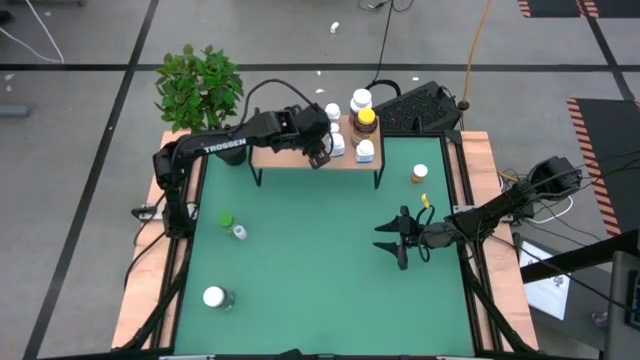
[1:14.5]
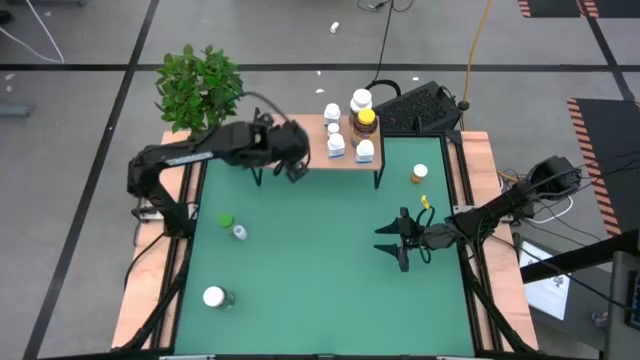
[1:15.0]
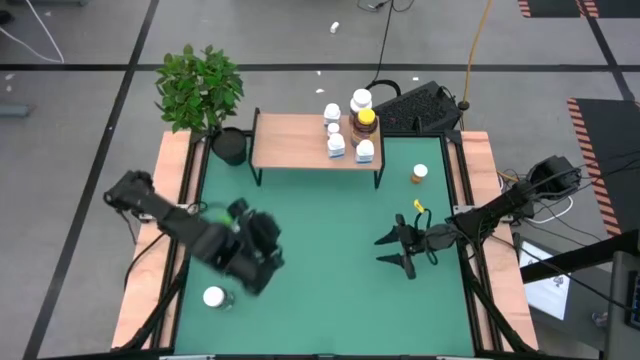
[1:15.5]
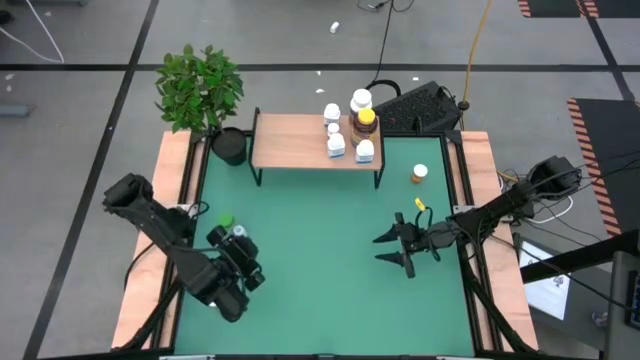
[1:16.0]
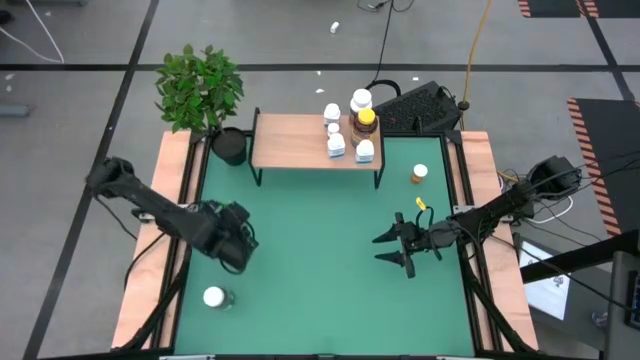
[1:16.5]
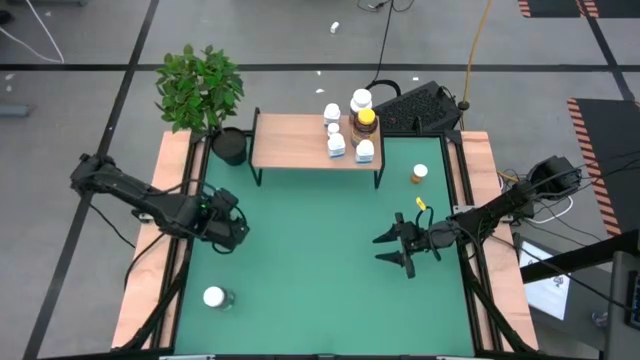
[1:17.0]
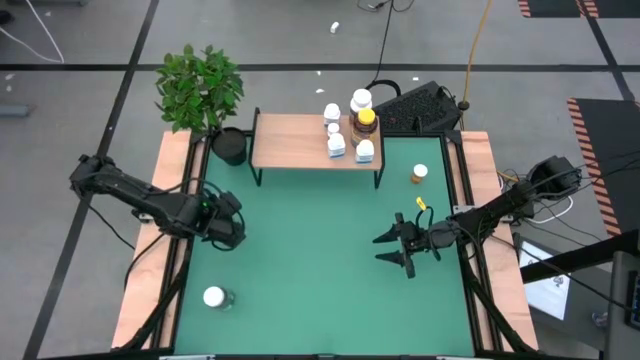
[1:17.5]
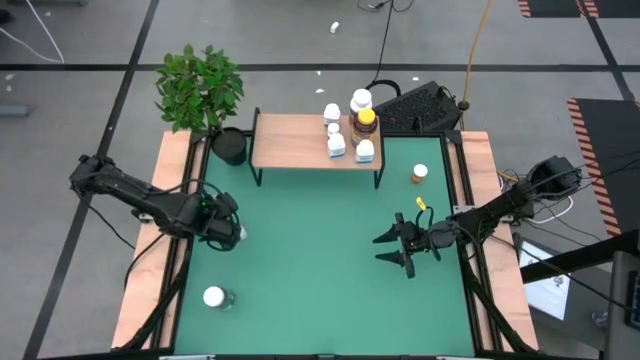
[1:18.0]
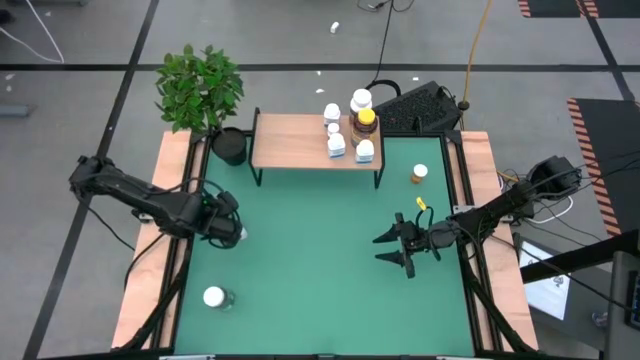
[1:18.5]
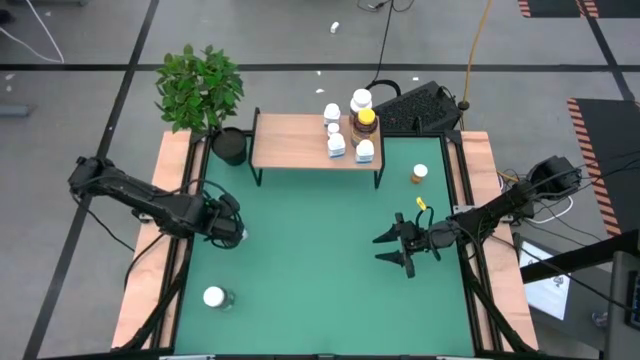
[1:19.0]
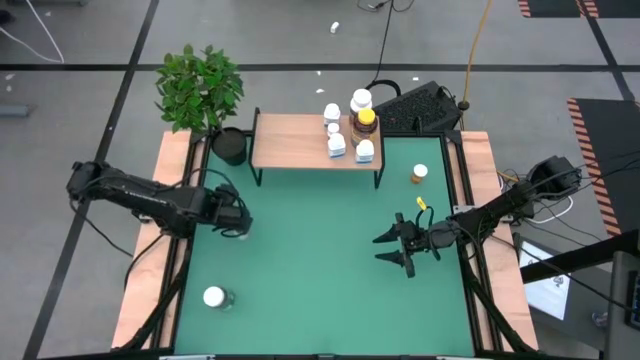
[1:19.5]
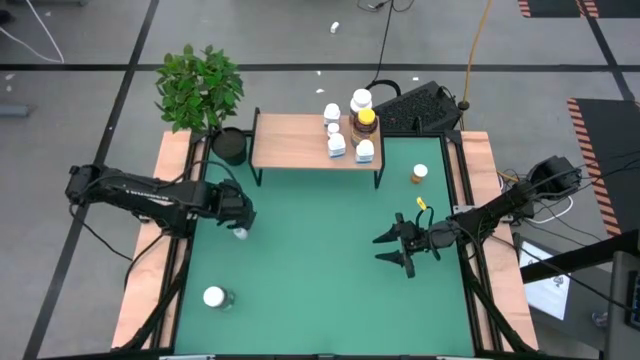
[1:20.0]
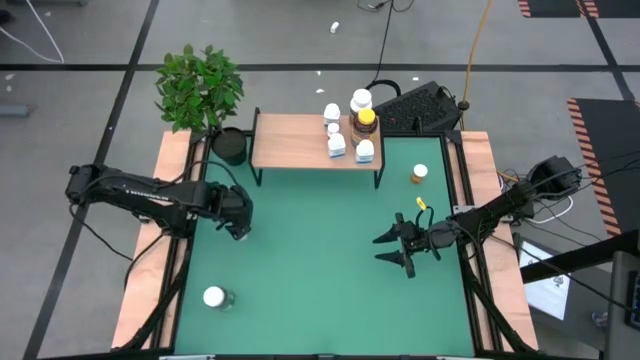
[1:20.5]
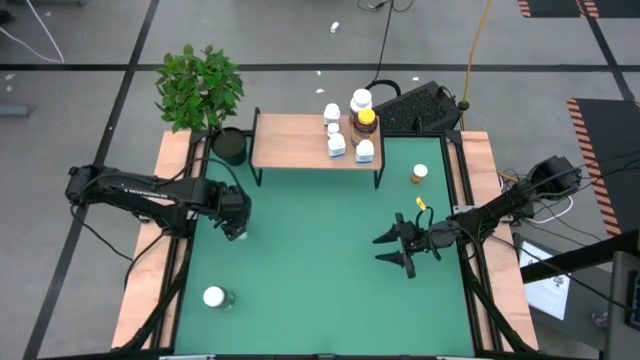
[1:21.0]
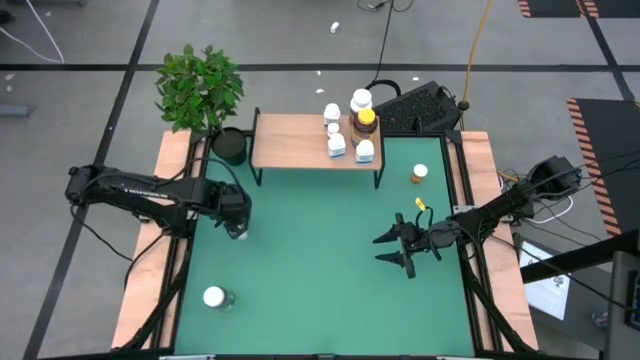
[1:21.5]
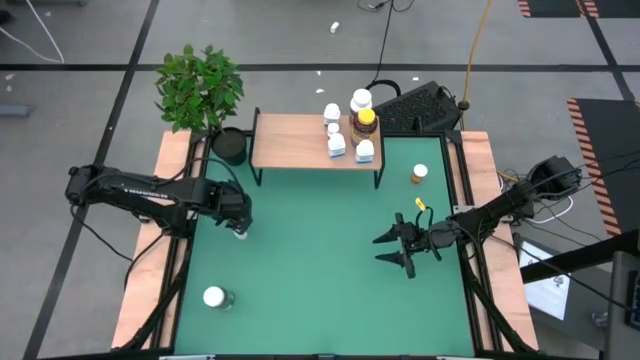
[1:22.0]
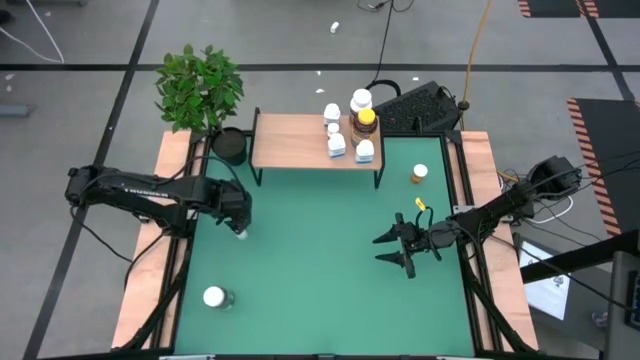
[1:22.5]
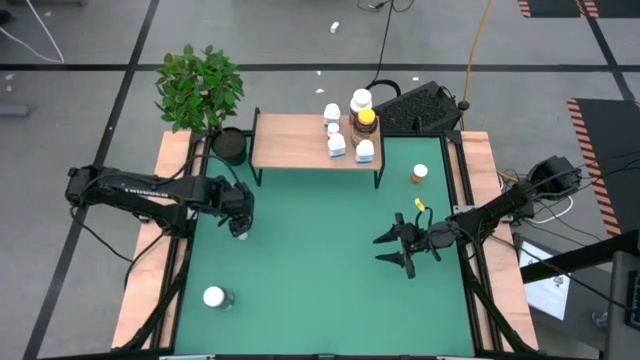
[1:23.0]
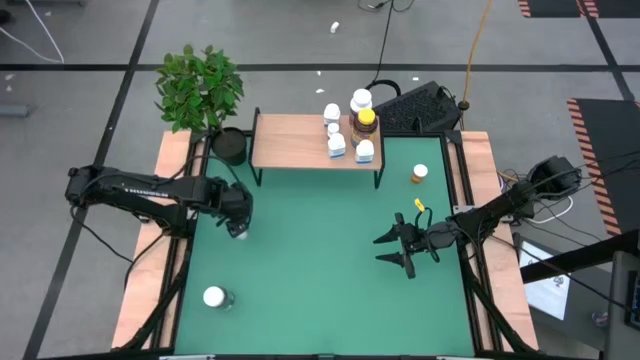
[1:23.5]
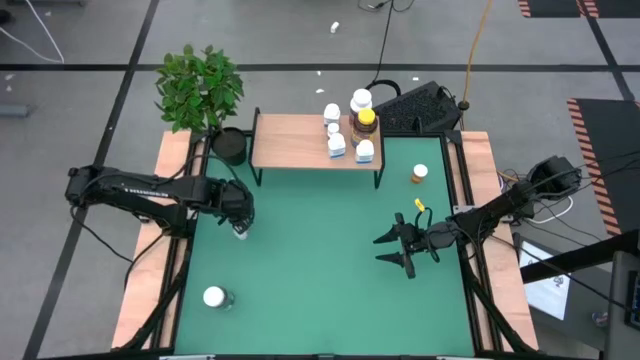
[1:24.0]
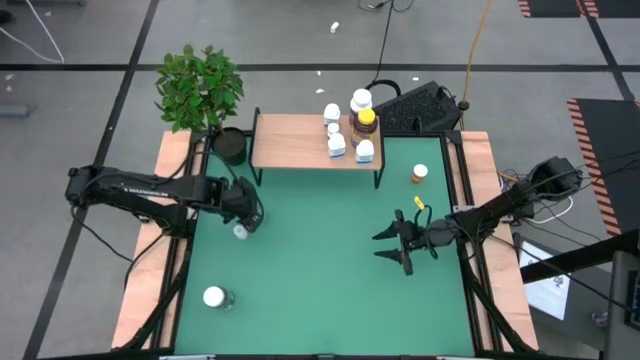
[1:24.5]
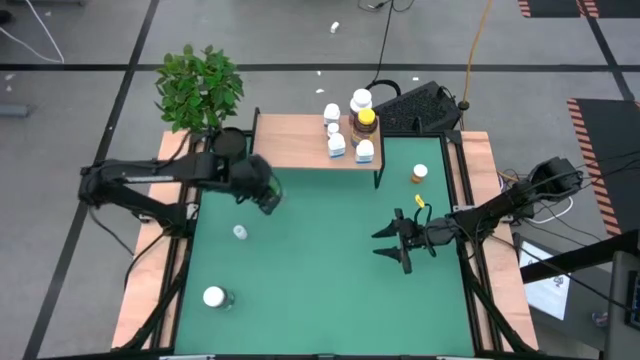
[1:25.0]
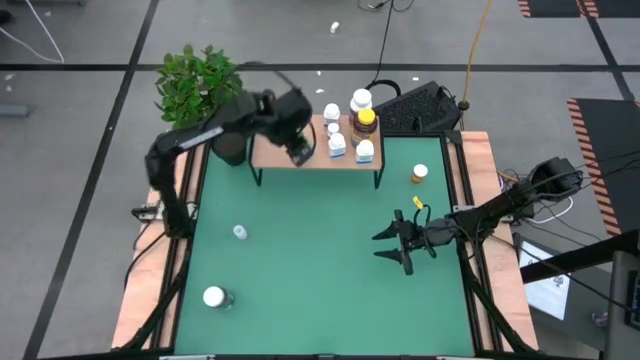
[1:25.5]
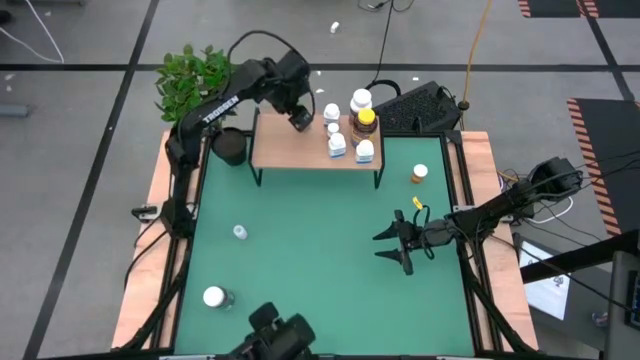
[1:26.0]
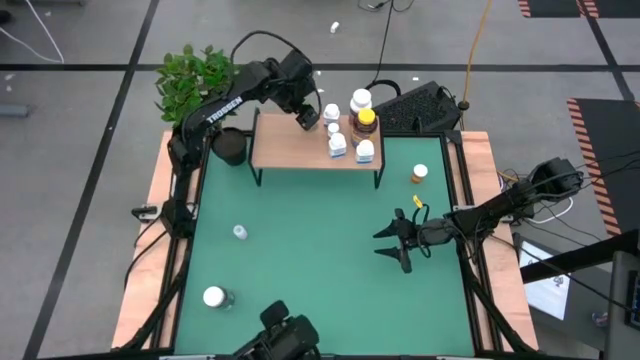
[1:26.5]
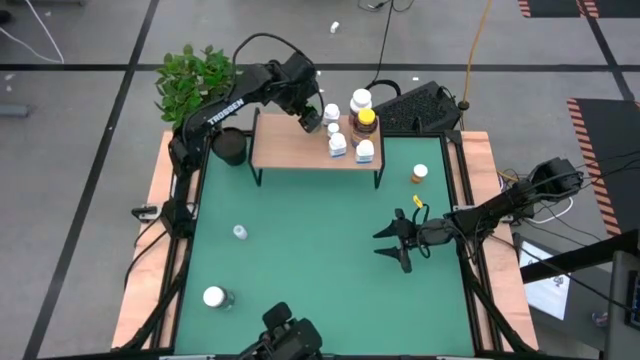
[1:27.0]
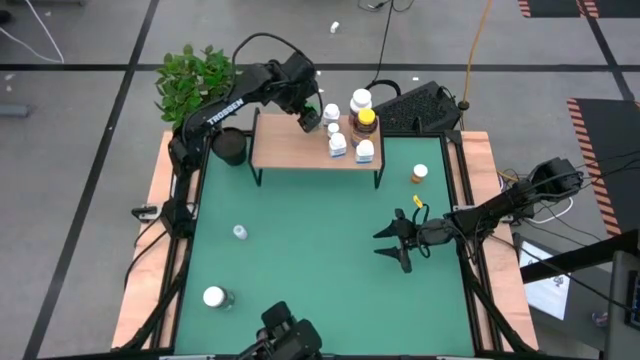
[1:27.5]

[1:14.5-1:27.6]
Task: Pick and place medicine bottles onto shelf by color
Put the light green pill bottle on the shelf

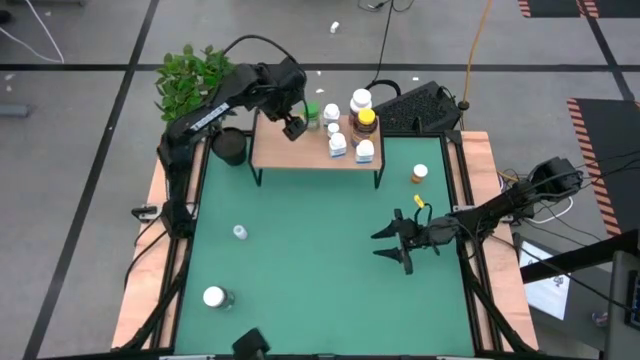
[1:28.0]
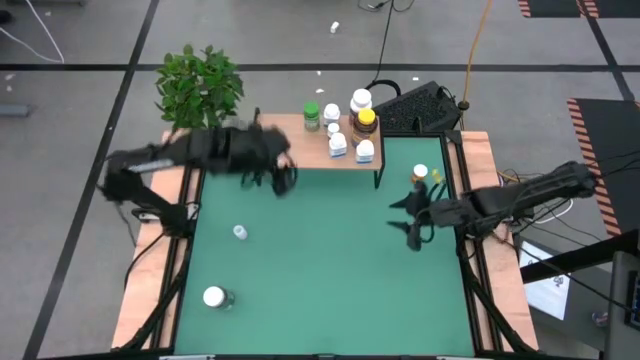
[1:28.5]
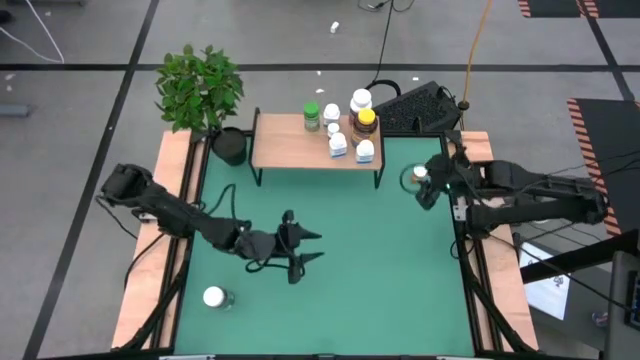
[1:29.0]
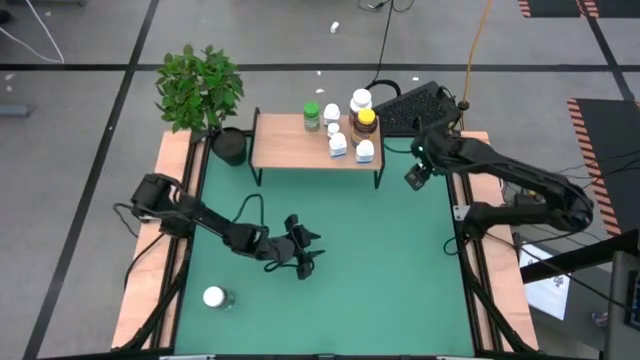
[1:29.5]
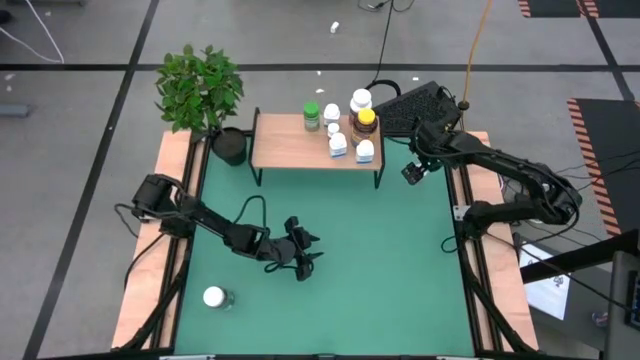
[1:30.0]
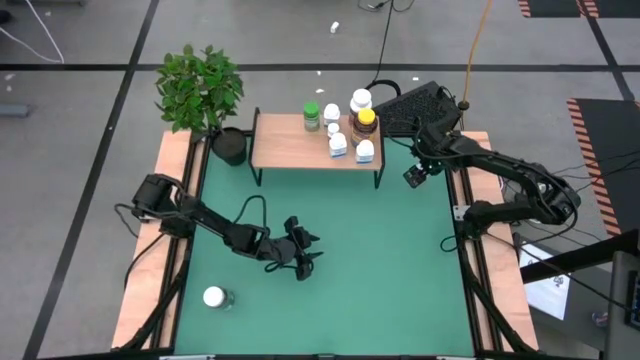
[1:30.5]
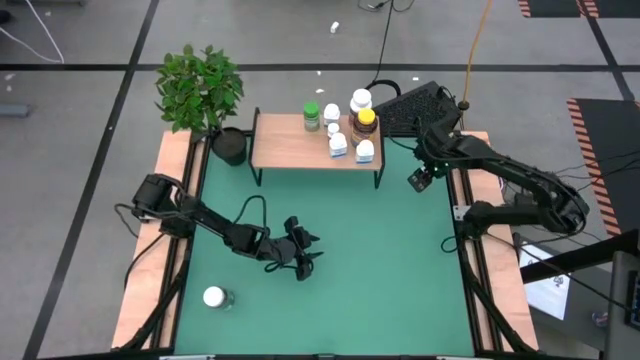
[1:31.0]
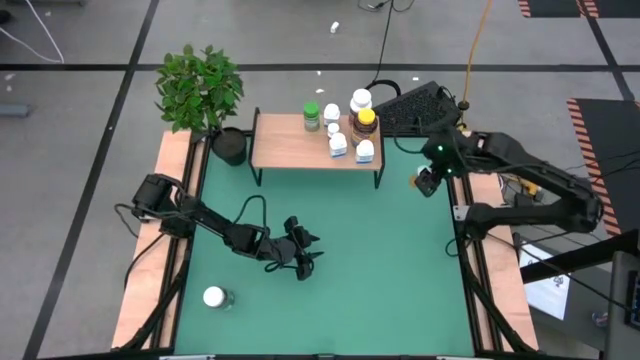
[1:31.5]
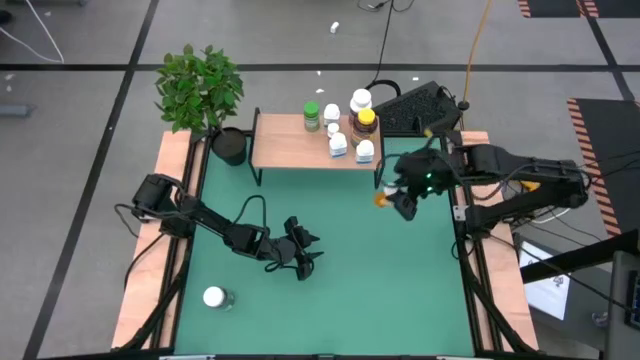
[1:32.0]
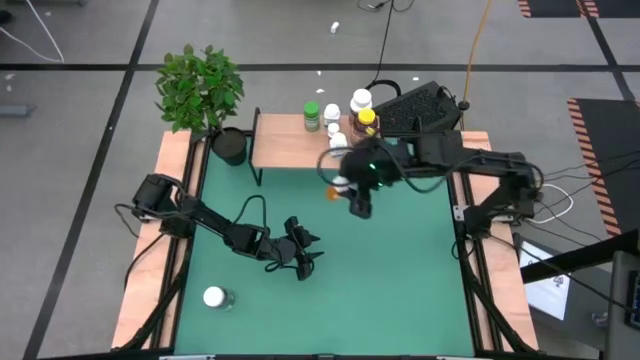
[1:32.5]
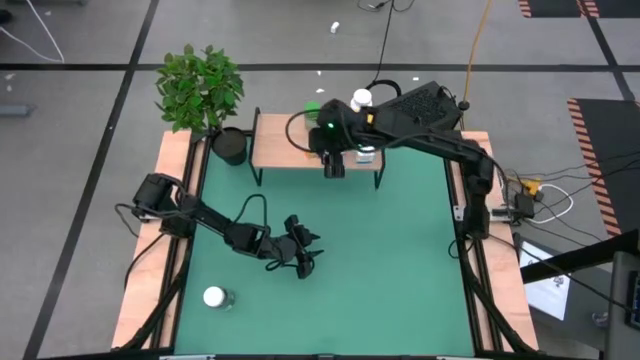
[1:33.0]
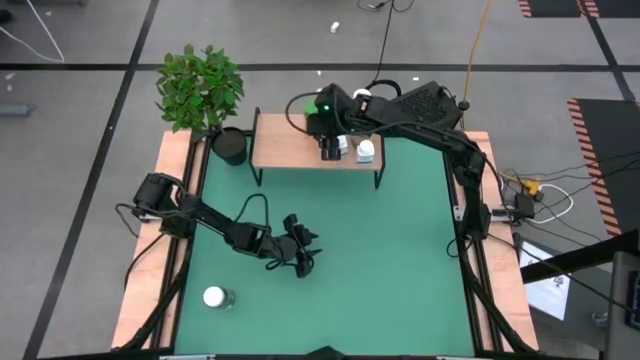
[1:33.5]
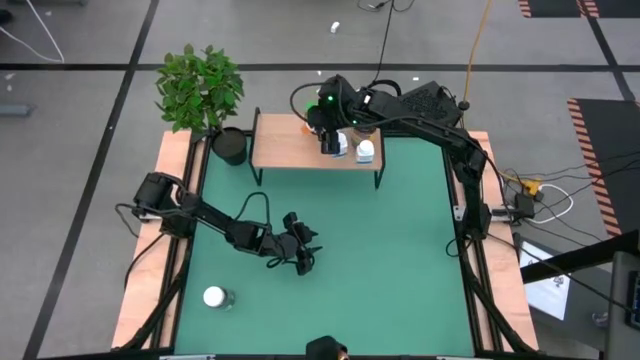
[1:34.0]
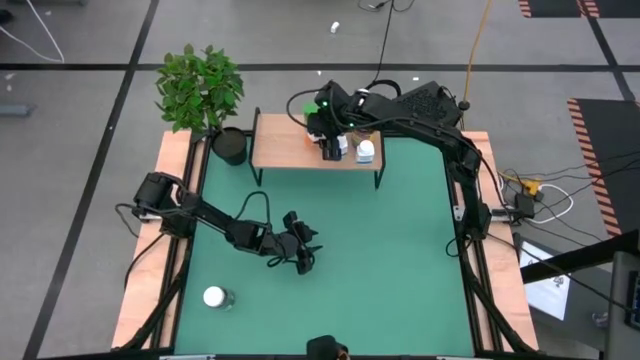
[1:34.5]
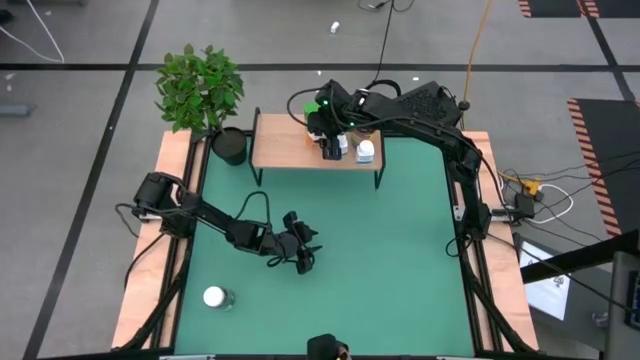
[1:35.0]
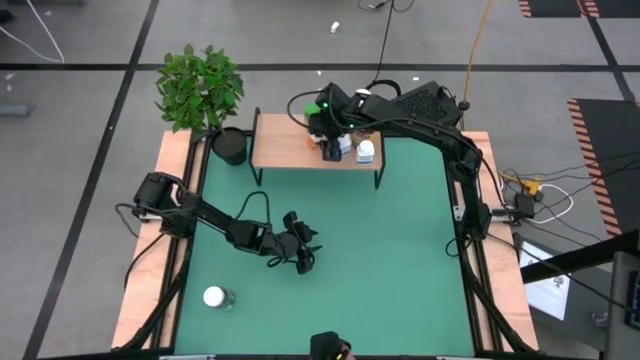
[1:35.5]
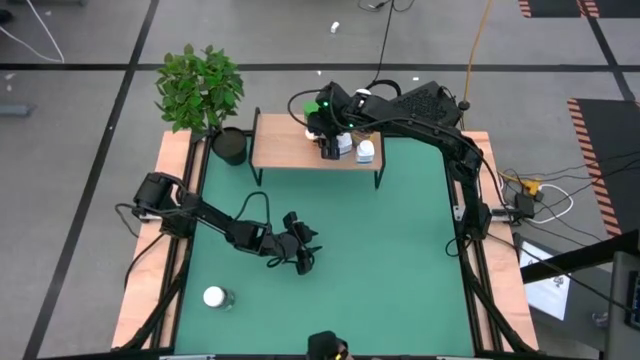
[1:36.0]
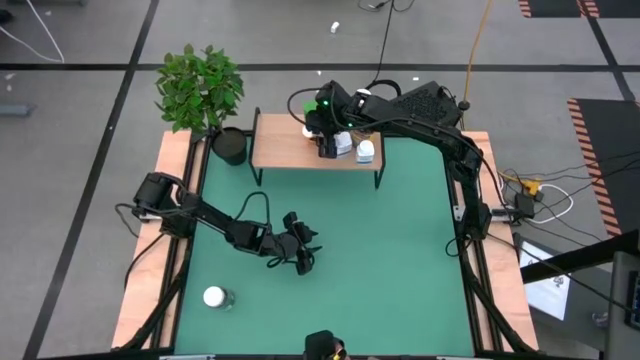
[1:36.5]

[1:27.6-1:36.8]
Put the orange pill bottle on the shelf

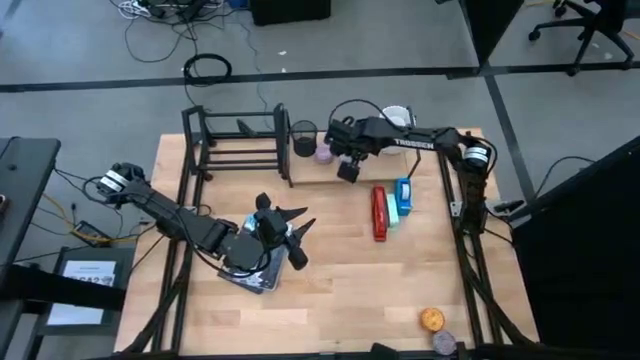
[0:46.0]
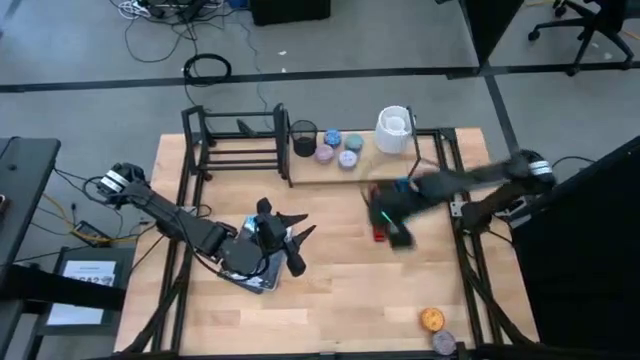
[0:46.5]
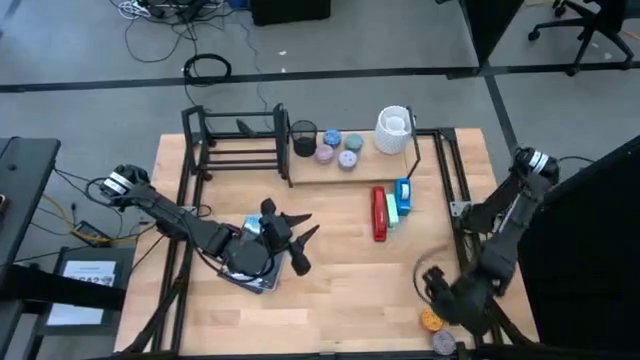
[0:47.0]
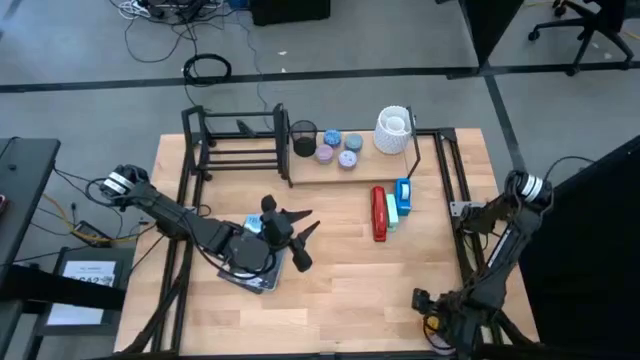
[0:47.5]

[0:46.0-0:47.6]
Task: Stock shelves
Put the yellow scented candle on the shelf
